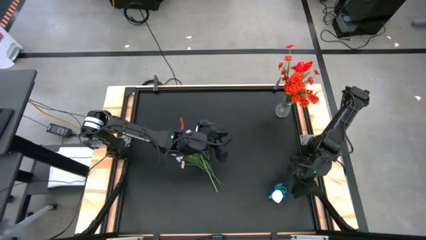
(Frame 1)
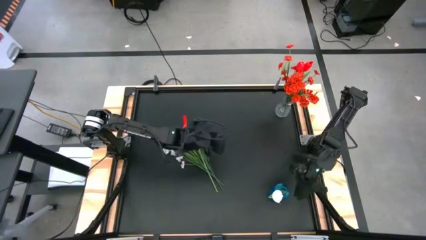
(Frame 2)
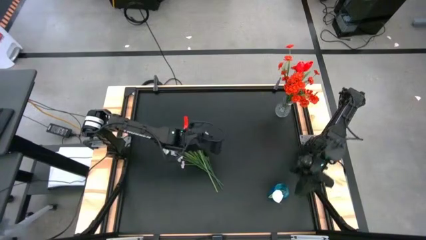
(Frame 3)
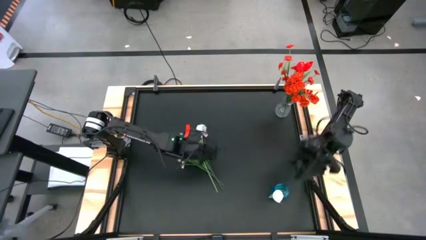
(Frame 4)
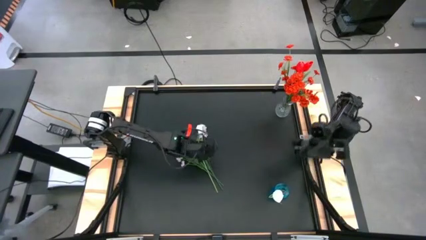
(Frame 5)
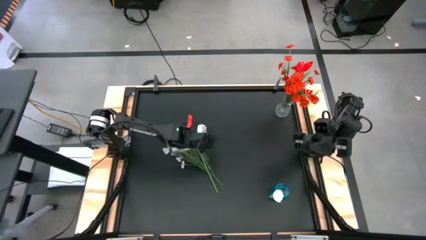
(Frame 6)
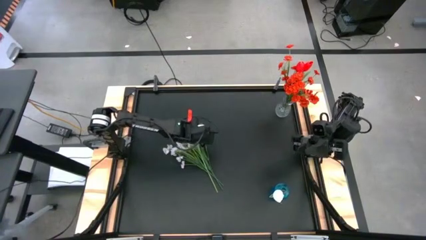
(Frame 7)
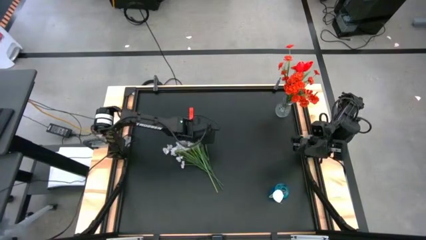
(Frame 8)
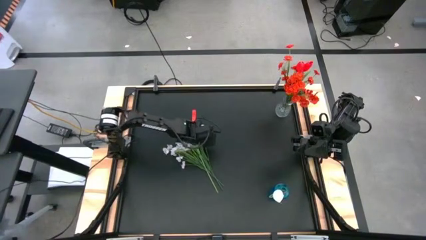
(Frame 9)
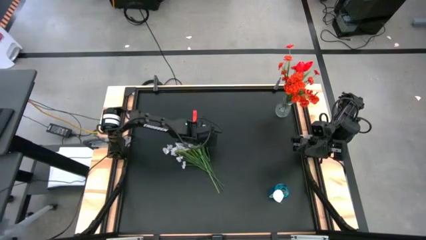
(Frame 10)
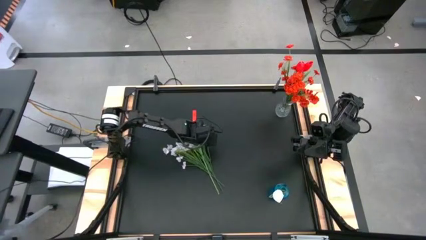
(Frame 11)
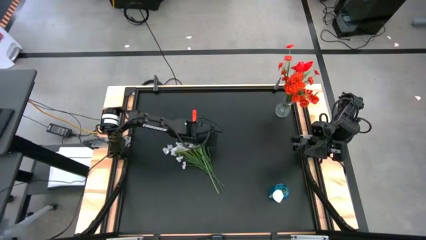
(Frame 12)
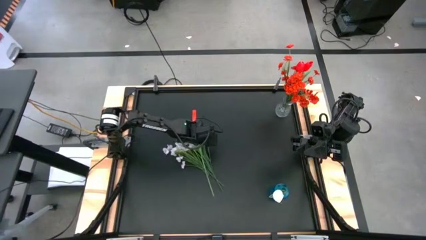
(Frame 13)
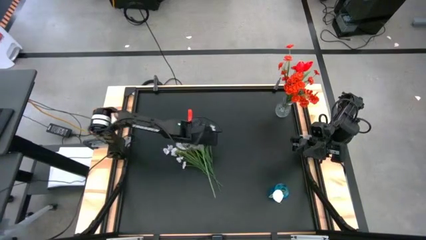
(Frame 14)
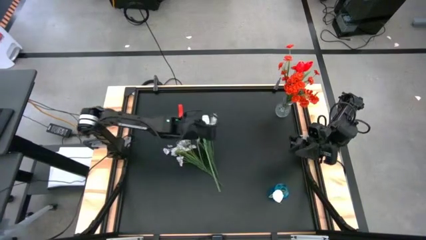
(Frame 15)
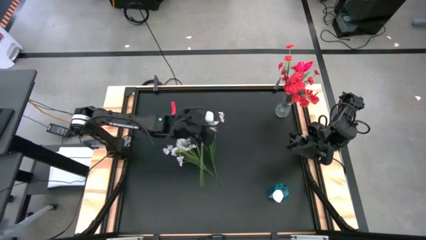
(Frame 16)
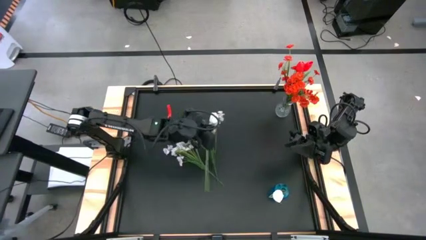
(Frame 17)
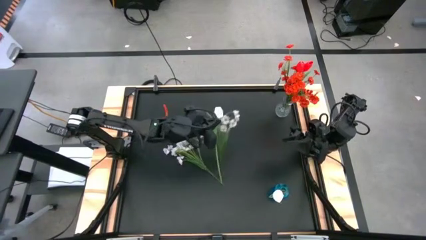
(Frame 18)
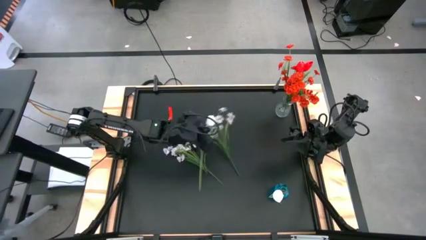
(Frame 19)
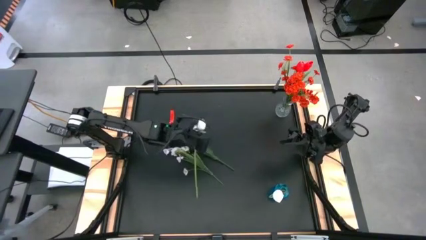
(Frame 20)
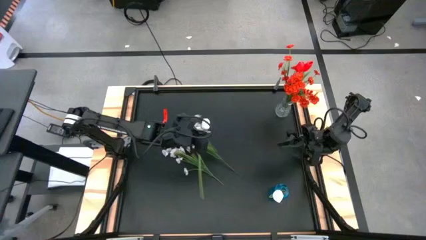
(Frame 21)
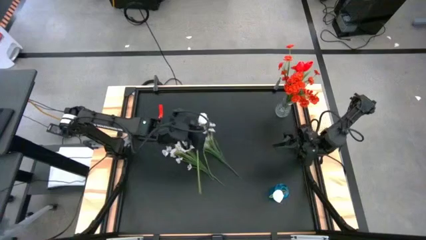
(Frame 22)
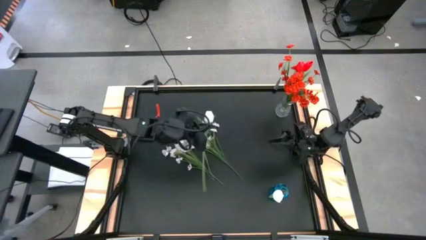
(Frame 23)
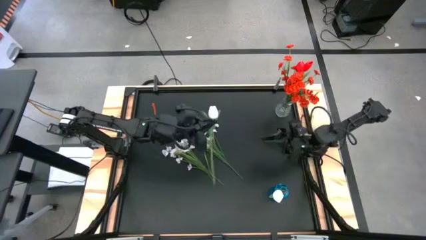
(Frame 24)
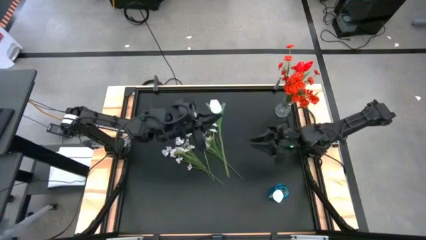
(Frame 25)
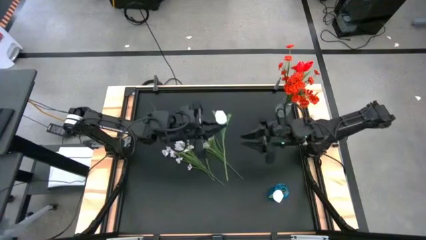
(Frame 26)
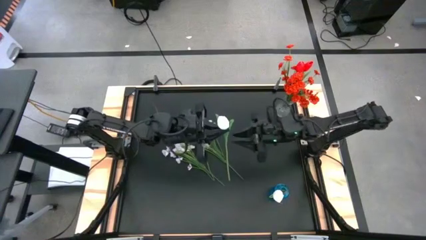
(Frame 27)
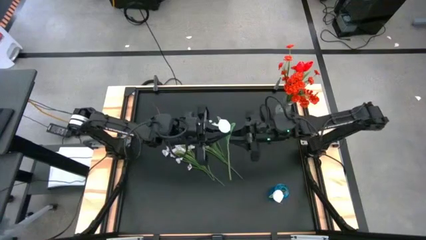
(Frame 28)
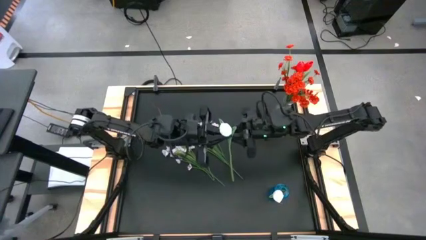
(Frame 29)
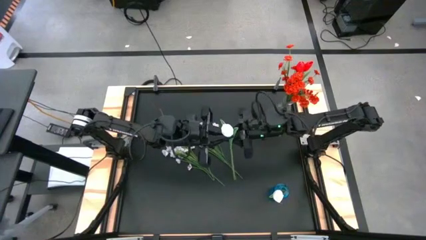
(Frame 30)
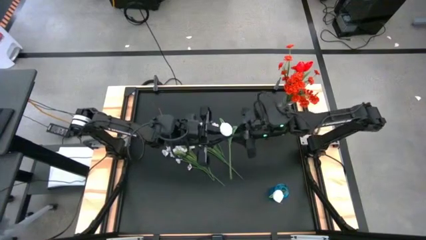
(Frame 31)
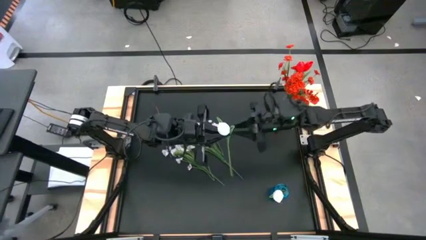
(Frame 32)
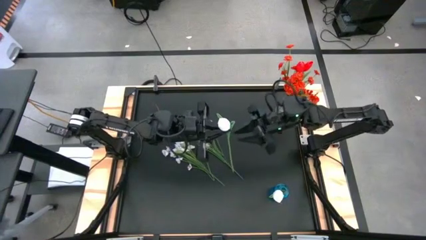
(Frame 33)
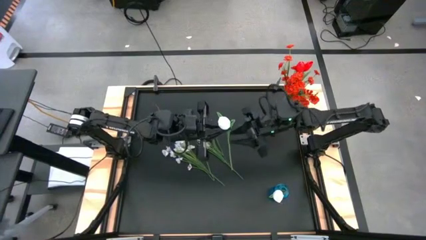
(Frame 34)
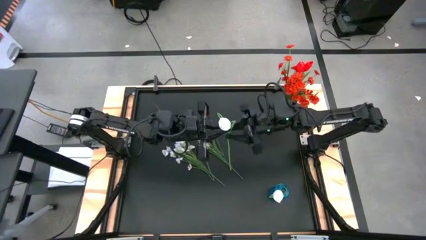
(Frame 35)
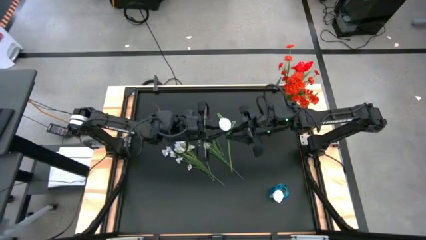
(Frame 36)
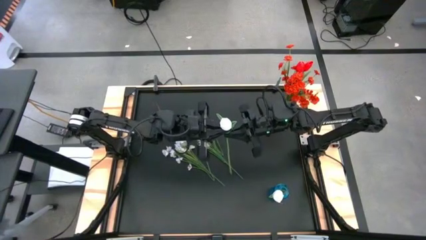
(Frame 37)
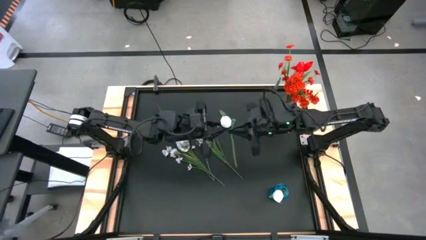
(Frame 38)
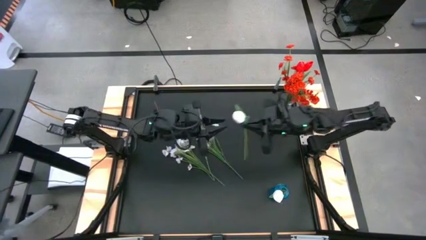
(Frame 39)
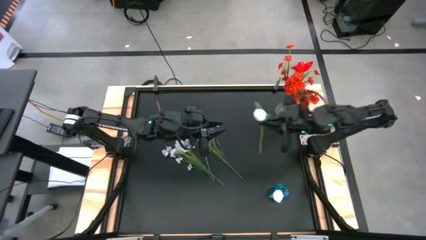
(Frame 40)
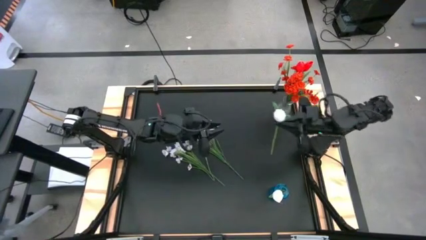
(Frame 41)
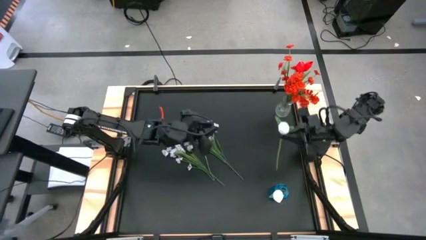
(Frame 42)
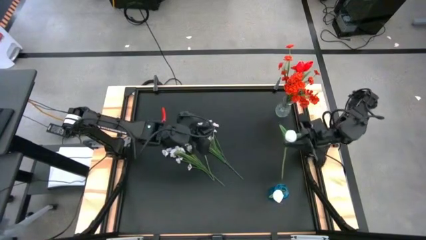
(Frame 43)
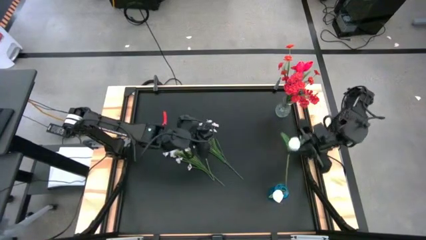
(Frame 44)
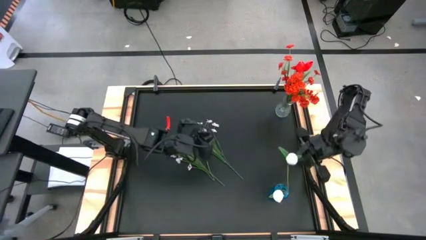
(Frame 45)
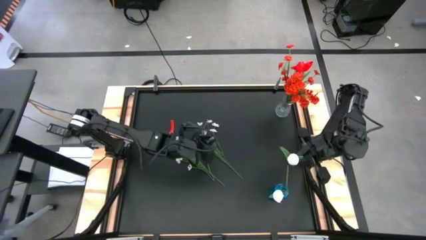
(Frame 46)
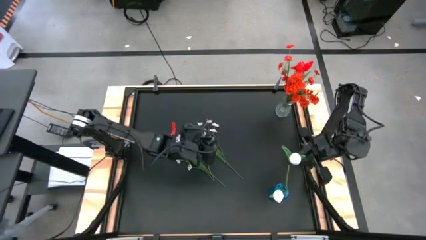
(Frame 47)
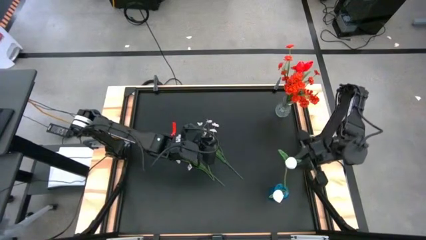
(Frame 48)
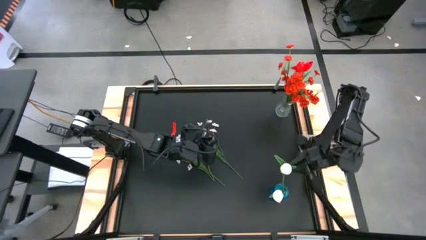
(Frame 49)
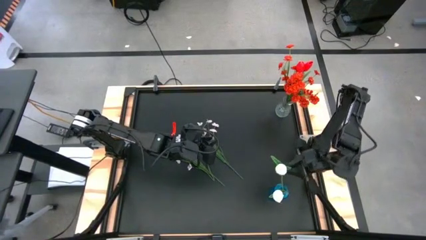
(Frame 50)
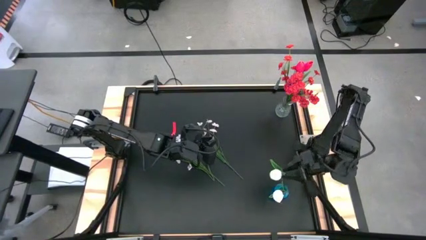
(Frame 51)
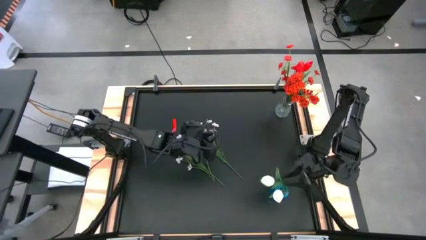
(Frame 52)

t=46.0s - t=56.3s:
Task: Sort flowers into vase by color
Put the white flower into the blue vase

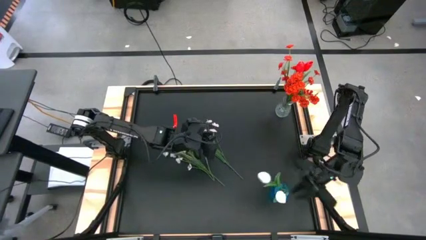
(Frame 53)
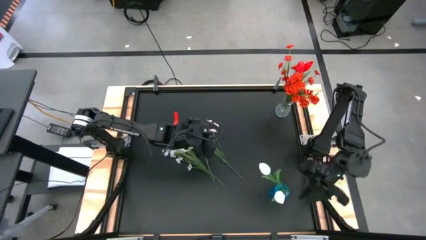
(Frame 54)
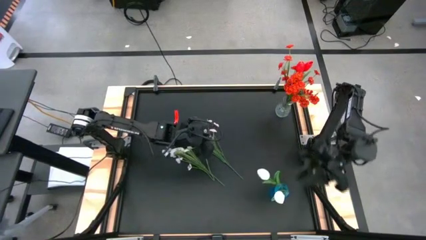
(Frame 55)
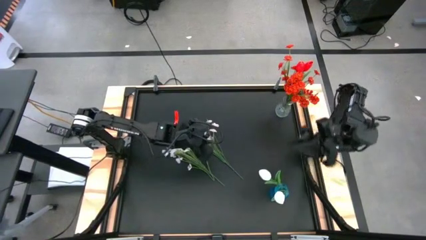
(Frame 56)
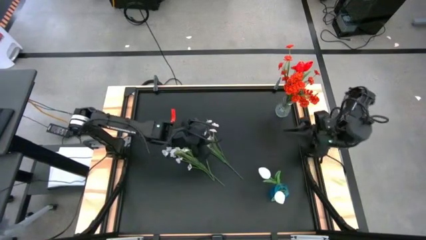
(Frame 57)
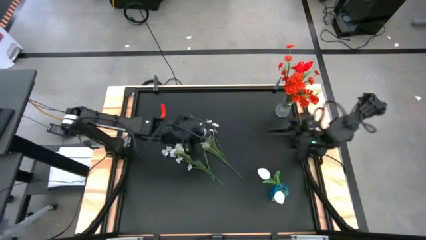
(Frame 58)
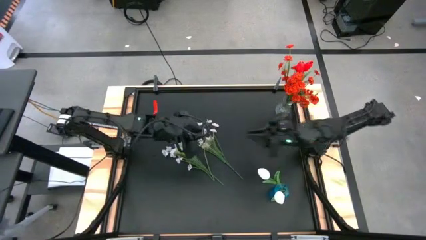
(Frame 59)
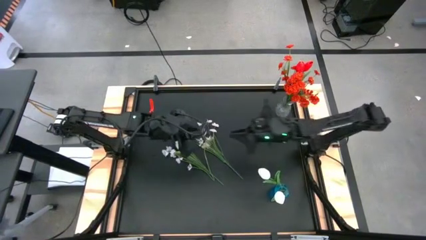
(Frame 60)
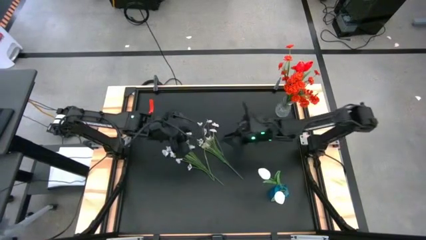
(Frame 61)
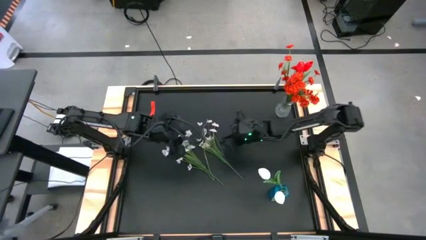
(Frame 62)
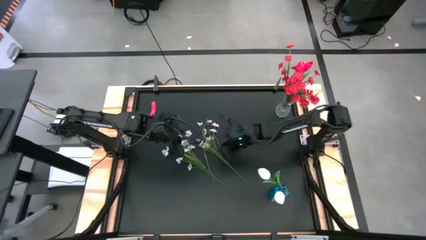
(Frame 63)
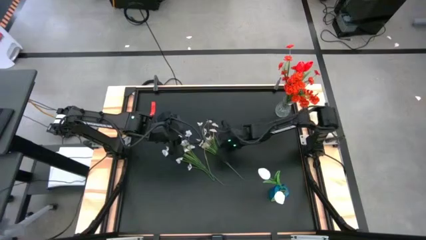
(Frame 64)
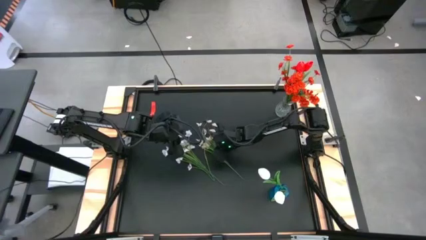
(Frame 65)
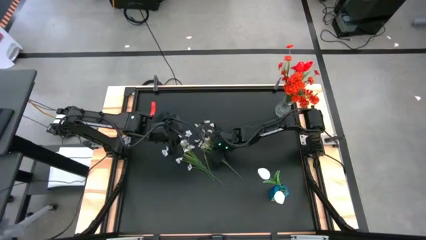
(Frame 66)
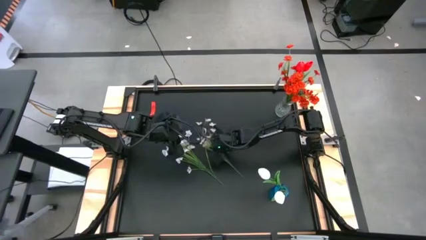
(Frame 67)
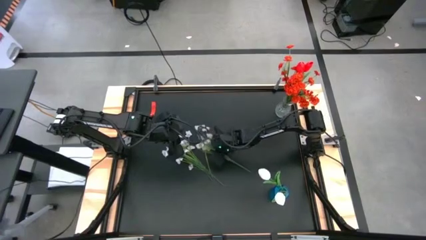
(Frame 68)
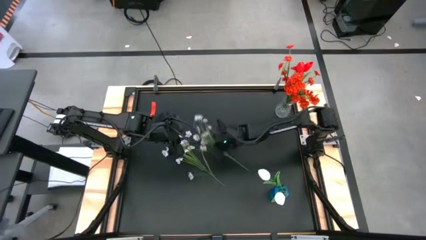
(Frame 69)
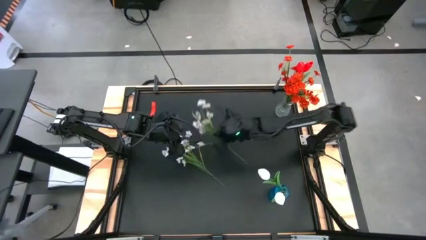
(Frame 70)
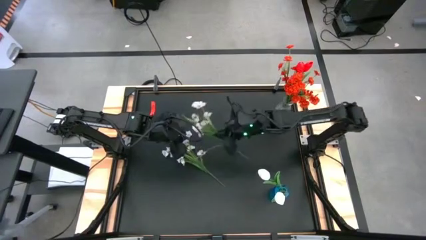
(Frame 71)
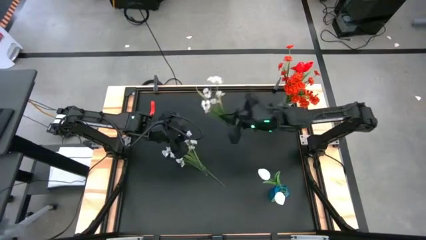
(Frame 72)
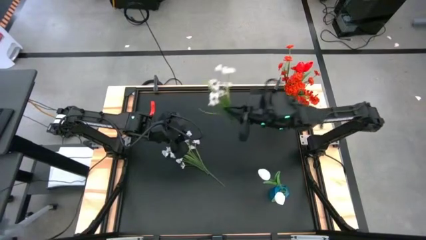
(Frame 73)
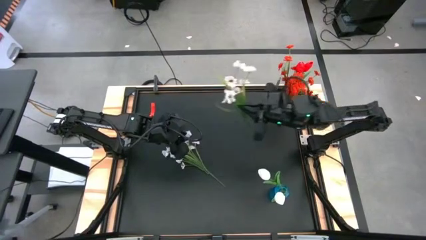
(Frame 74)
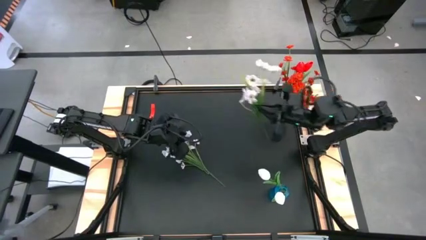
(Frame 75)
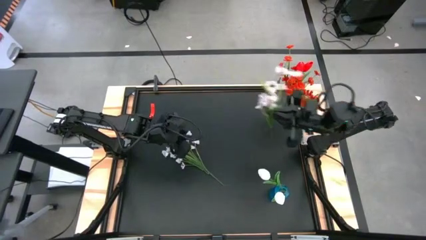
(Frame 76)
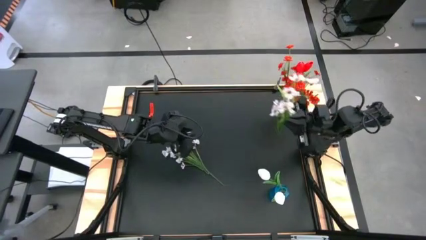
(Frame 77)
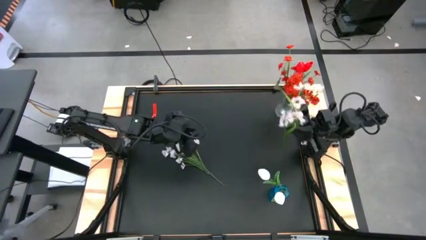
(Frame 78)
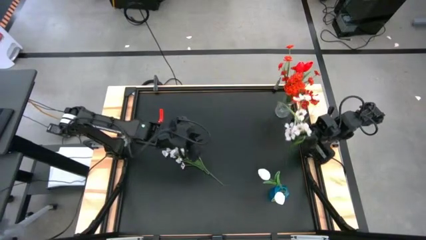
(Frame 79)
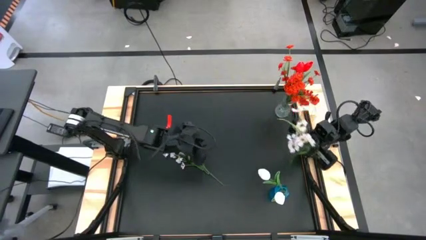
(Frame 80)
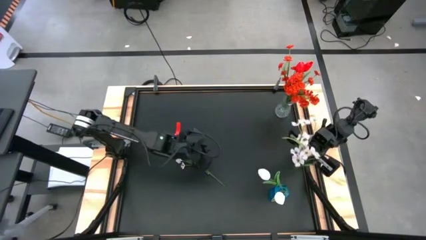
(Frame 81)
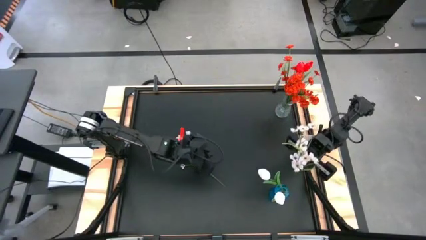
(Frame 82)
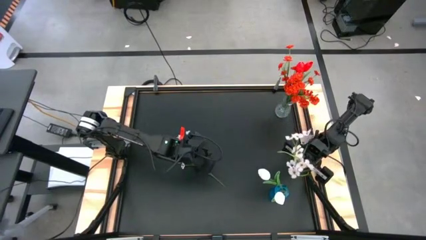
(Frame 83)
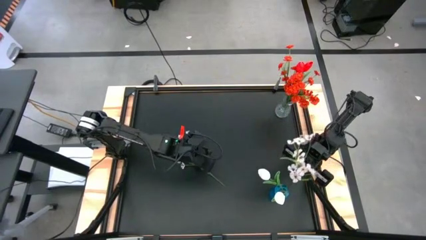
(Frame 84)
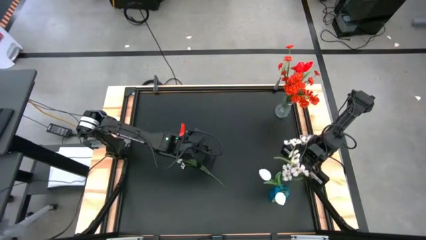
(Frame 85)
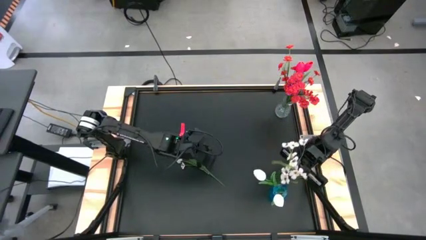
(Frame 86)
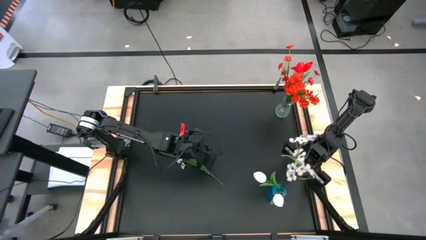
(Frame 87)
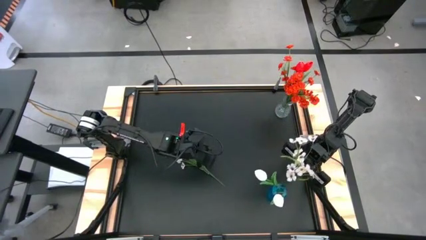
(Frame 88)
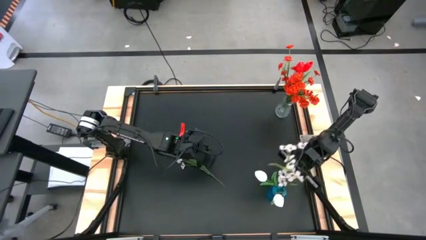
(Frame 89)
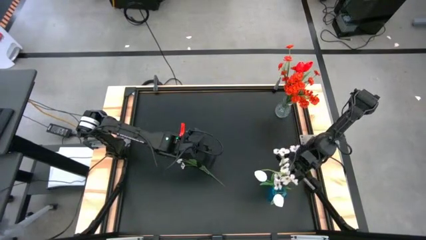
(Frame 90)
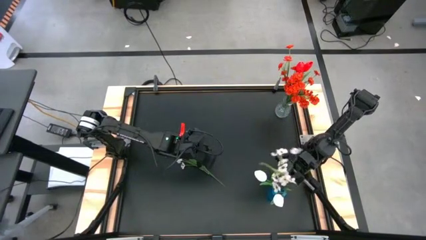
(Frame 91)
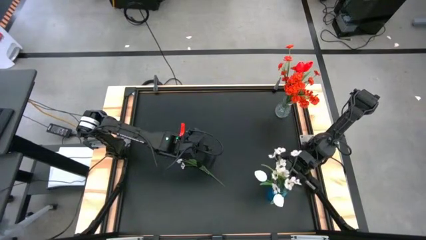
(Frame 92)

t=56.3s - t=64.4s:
Put the right white flowers into the blue vase
